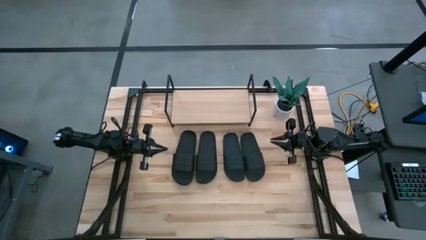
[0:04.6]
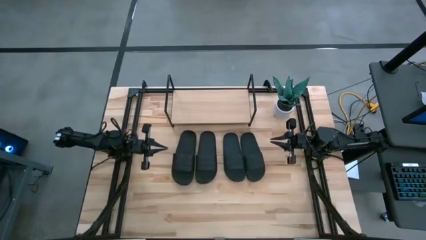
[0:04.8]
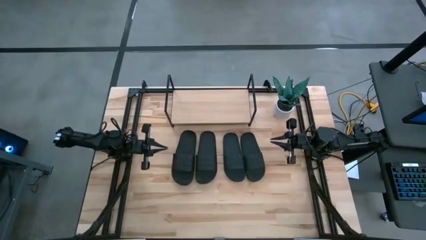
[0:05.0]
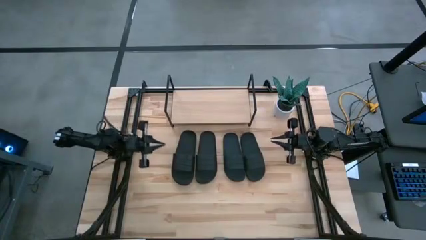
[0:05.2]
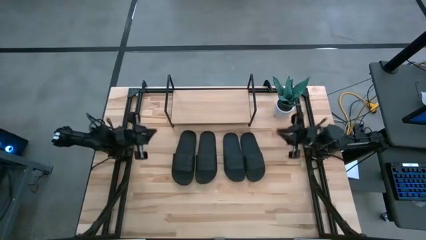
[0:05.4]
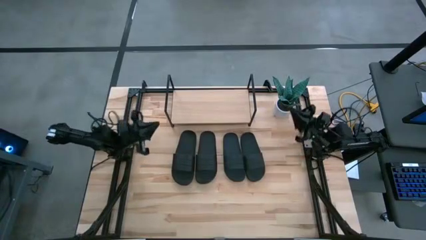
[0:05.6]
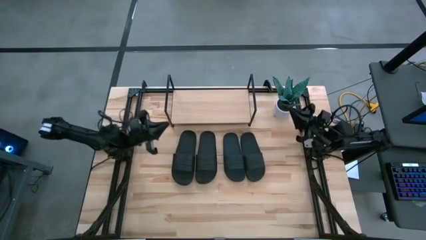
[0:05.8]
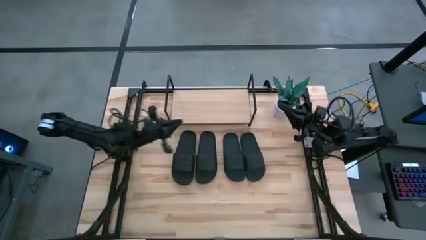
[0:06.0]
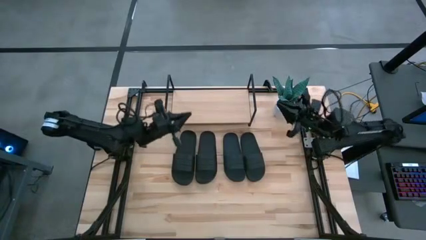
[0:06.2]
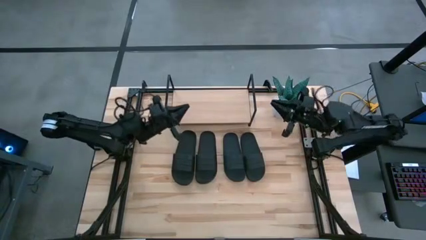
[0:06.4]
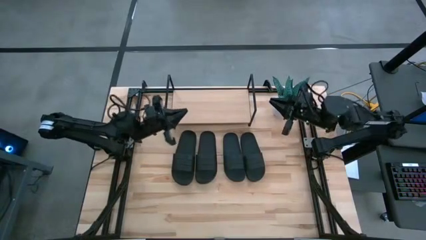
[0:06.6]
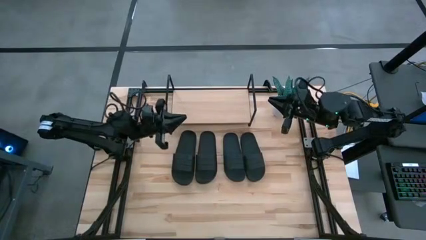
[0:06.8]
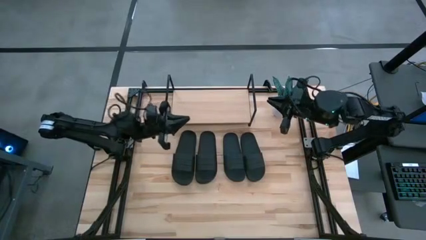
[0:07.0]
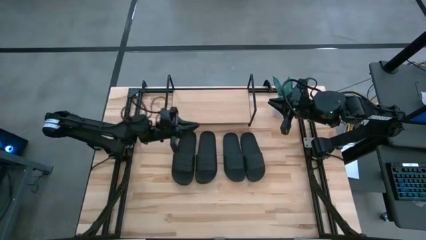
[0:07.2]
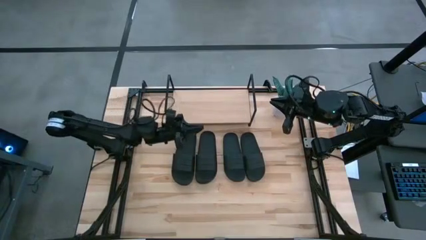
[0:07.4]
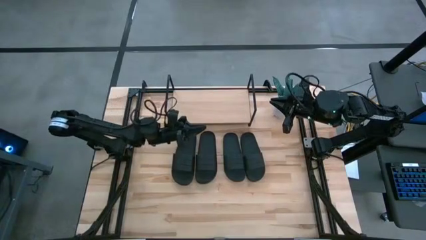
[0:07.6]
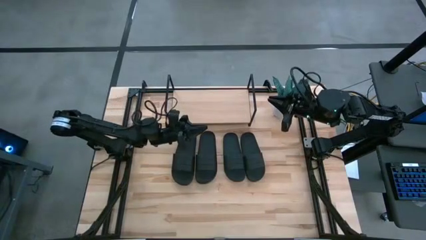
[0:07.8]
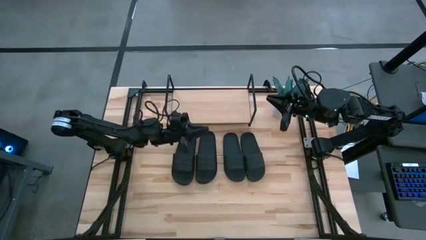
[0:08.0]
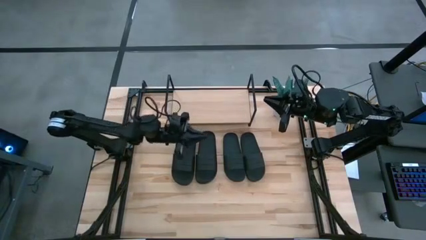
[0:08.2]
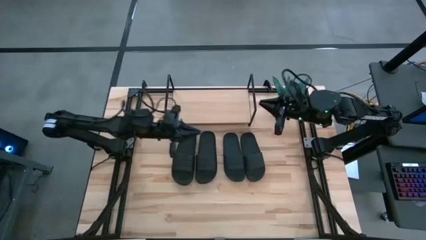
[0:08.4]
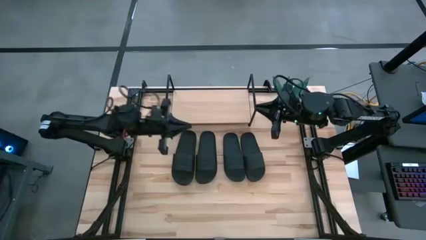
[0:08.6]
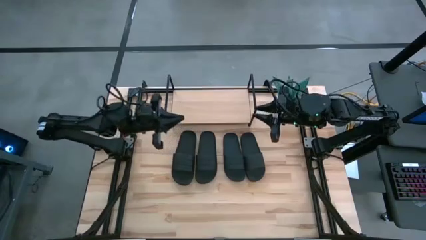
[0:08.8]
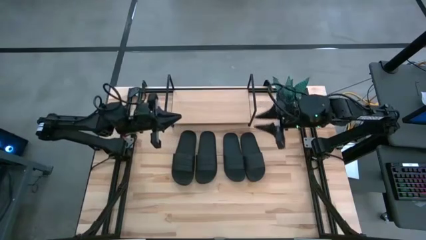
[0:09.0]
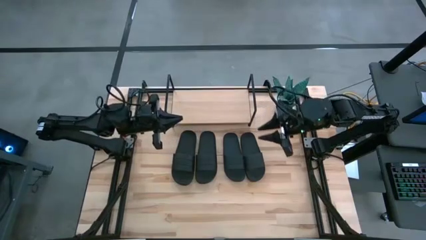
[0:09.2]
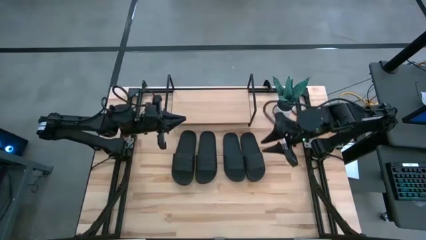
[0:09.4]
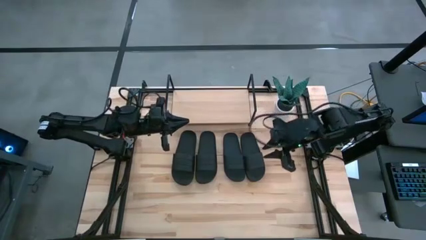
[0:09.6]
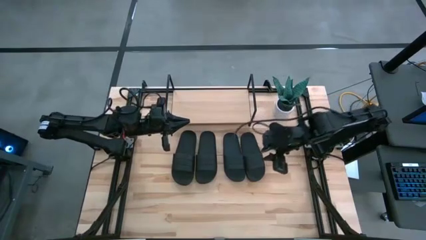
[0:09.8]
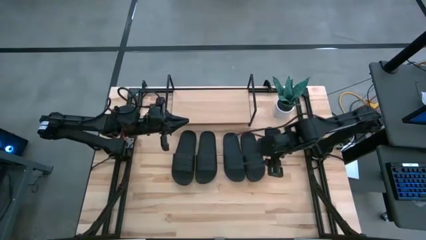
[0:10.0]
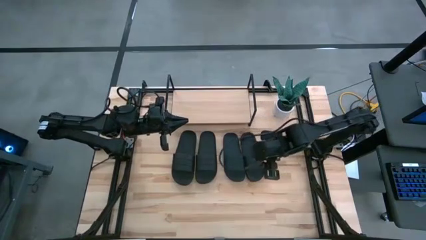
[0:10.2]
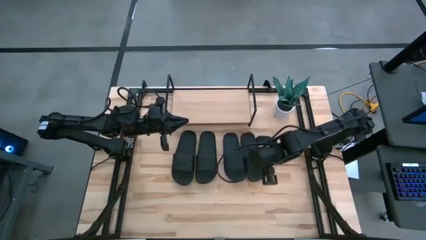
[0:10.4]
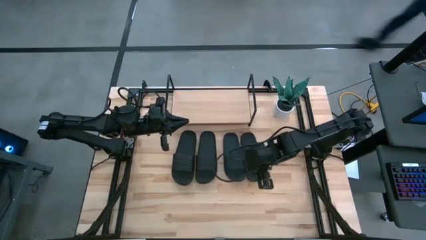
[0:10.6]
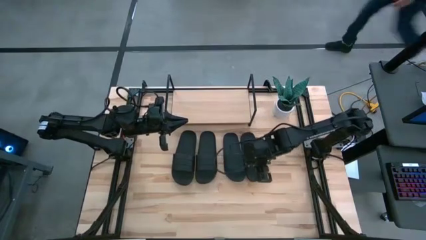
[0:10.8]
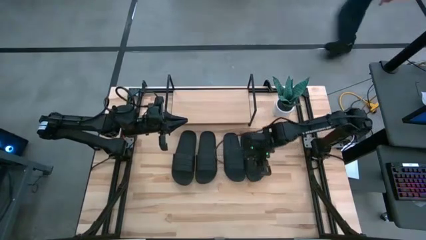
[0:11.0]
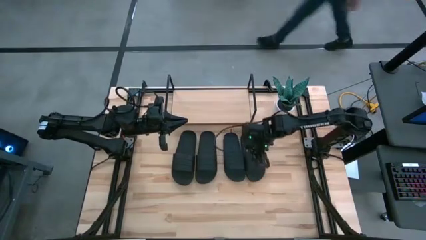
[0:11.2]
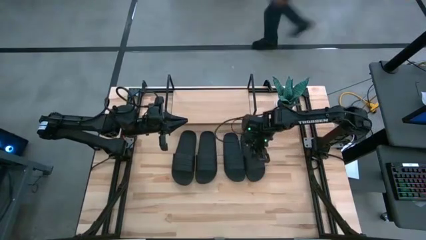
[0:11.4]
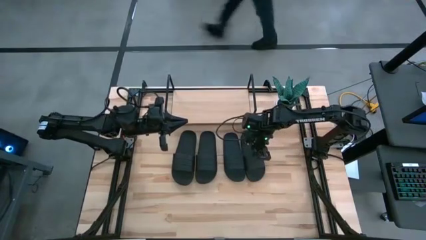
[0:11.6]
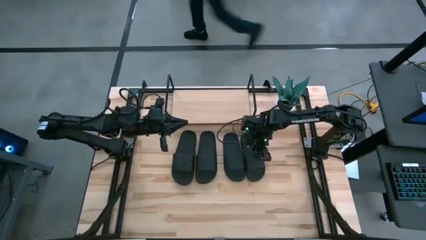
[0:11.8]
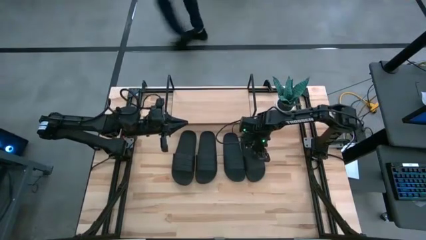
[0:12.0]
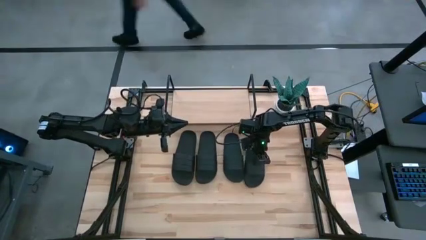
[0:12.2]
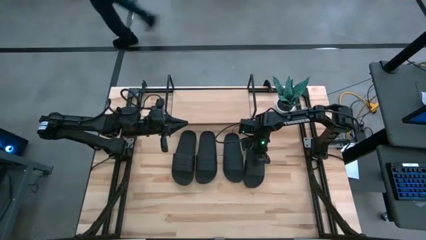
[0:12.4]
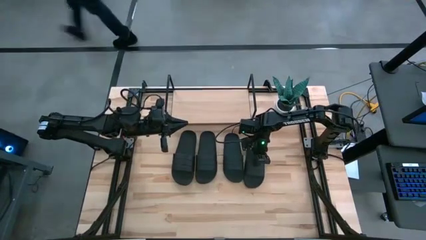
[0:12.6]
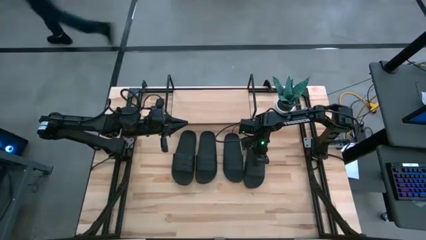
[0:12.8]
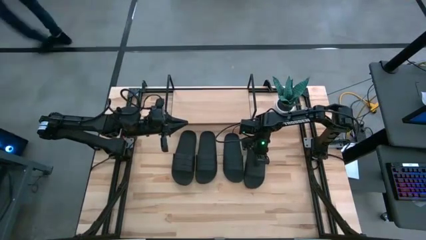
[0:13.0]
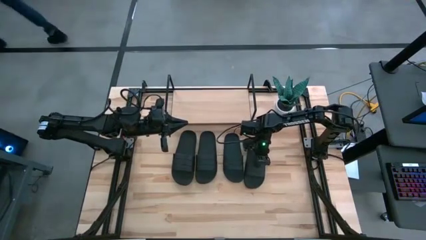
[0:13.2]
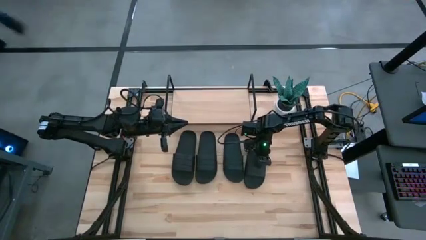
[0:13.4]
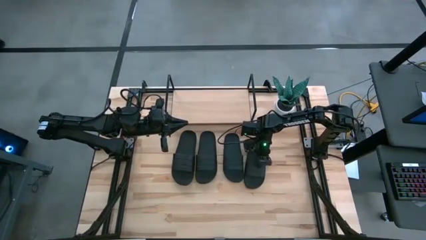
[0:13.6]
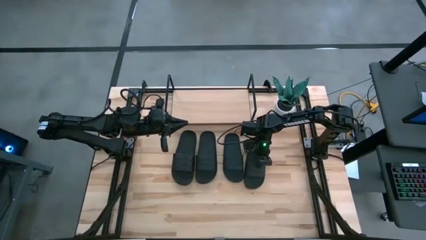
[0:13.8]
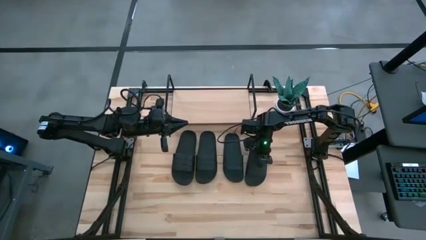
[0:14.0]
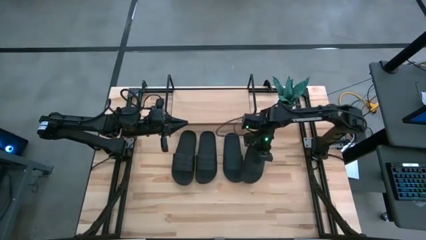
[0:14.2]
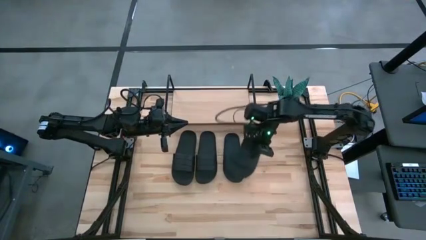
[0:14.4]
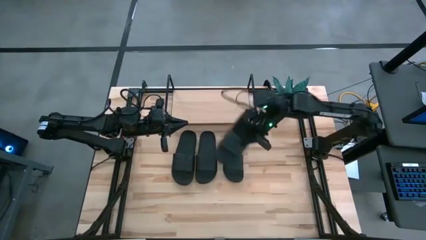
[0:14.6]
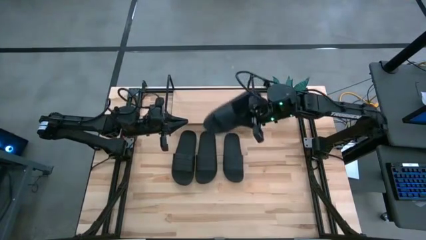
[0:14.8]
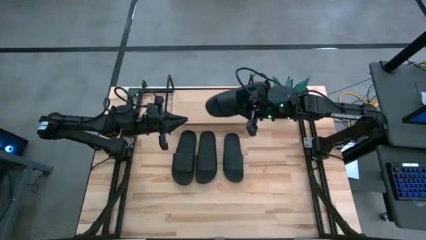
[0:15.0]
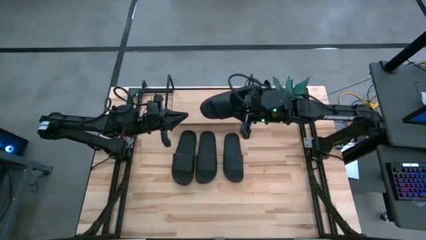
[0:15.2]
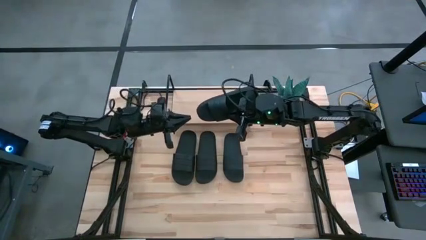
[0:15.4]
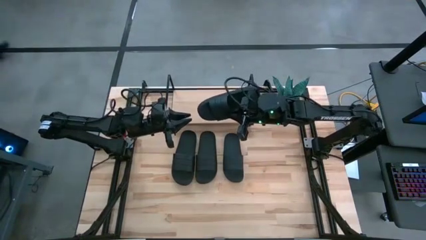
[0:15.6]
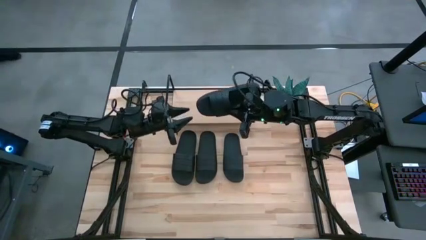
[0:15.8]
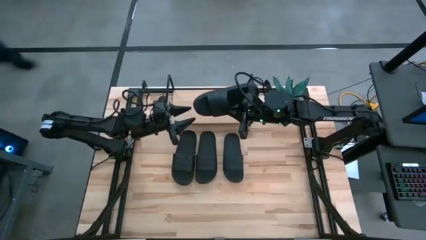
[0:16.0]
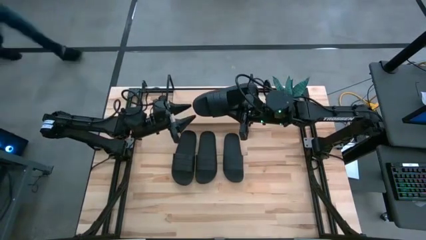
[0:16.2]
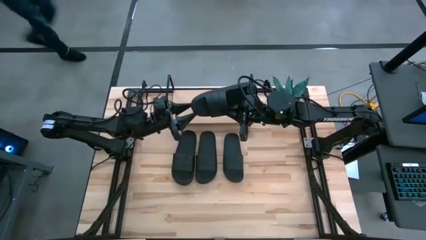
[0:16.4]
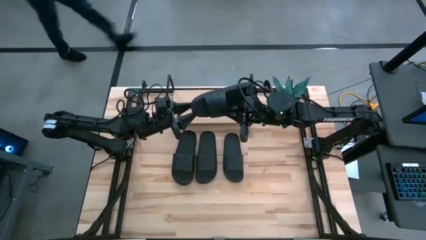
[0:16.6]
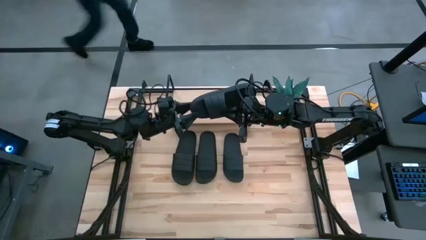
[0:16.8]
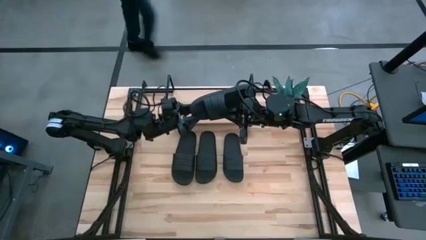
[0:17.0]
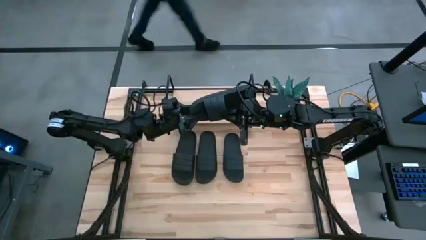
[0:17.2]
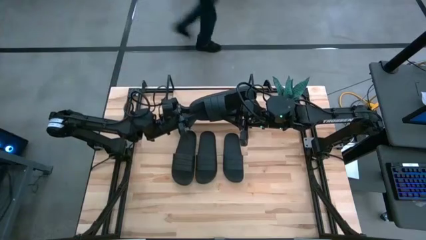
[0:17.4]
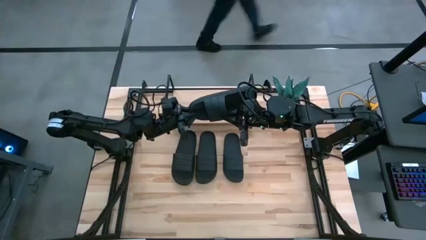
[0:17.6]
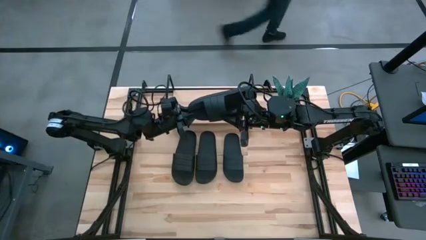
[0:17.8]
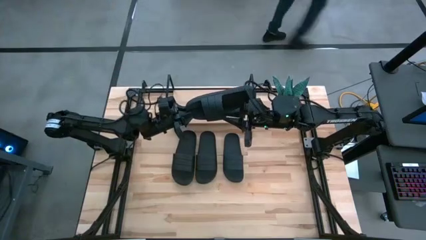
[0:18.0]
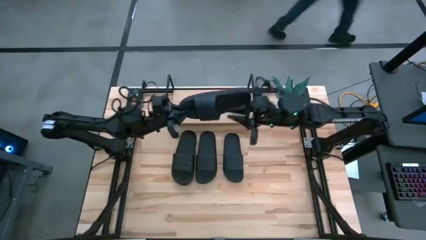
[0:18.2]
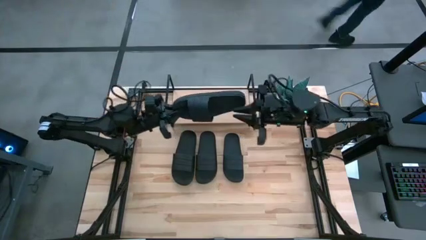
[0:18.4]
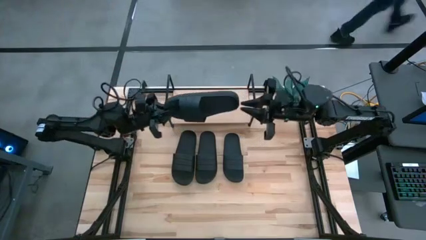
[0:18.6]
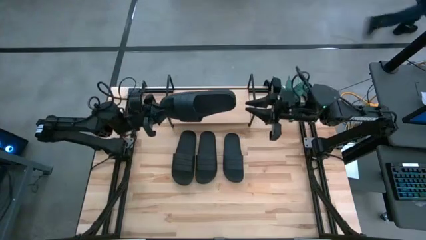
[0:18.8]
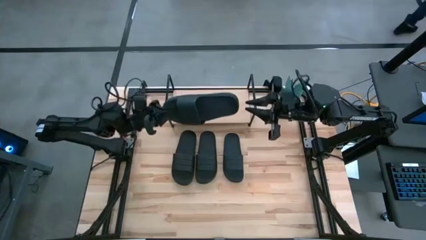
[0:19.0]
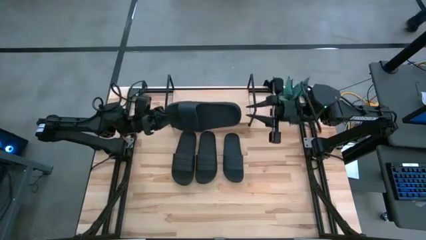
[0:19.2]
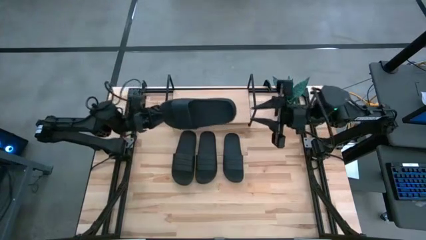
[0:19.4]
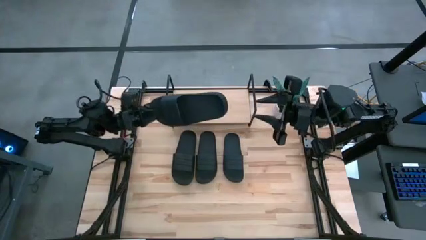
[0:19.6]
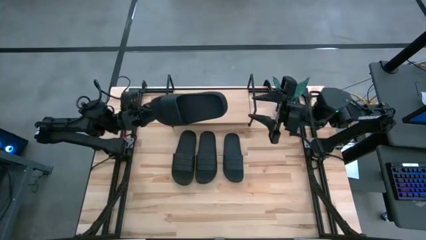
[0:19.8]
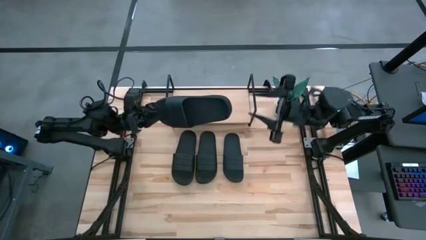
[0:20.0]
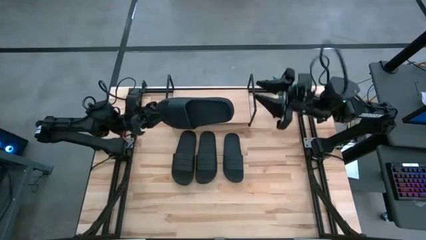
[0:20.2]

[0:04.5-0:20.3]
Task: Pick and place slides into the shelf
Put the black slide on the shelf
